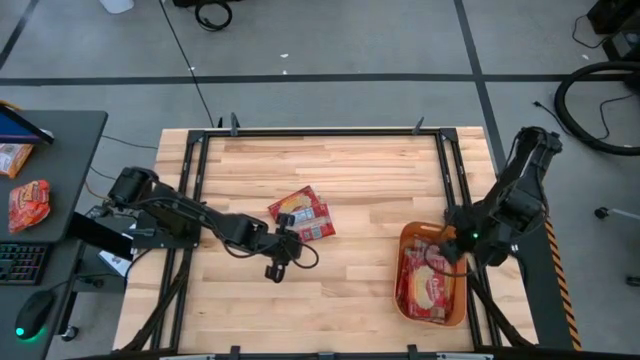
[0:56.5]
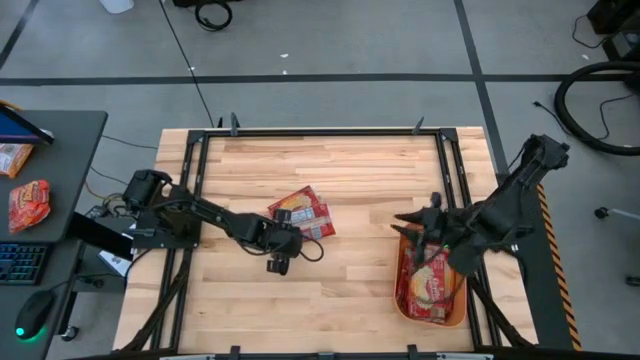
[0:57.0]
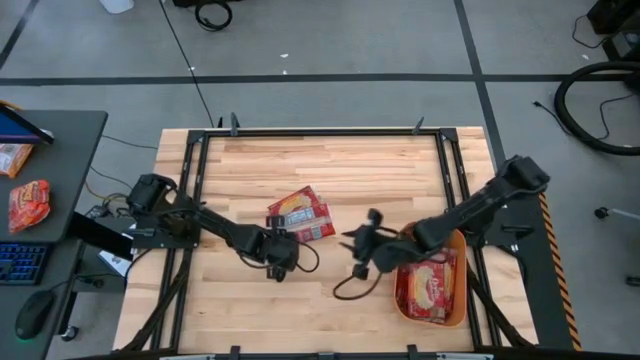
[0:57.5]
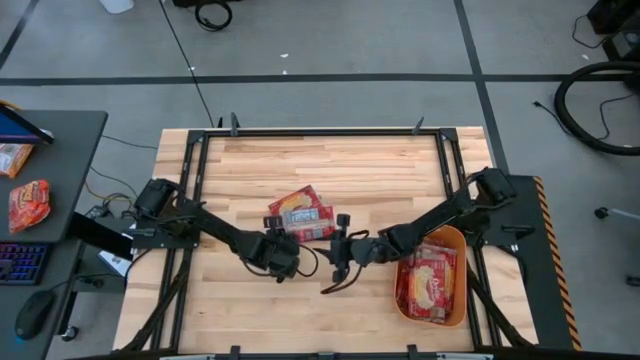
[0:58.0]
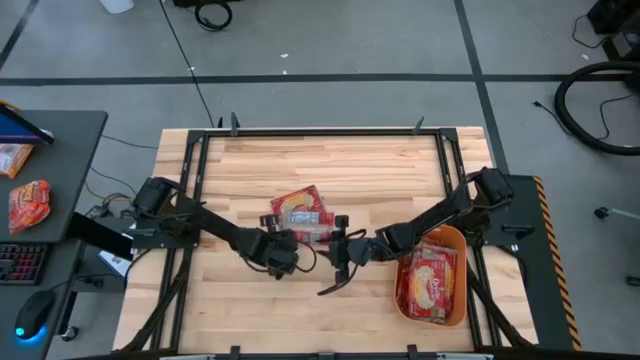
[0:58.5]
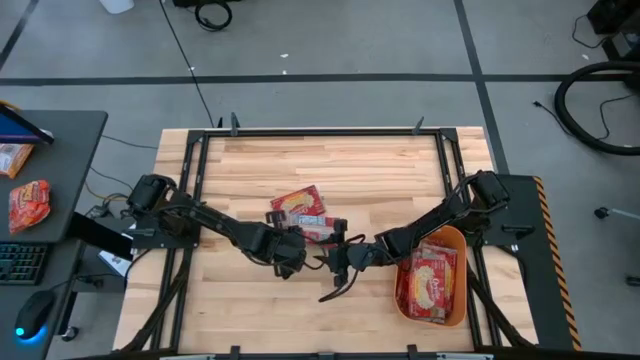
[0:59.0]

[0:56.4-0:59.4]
Task: Sort popcorn bags into baskets
Put the red popcorn bag into the orange bin

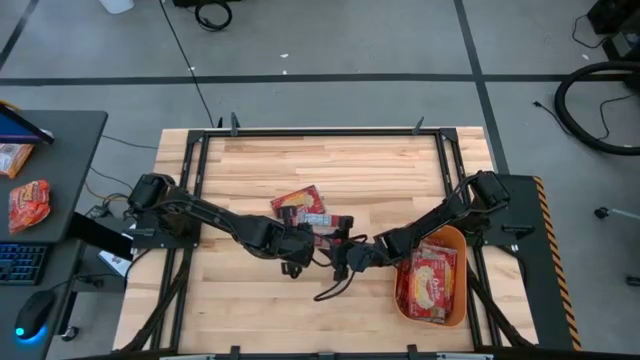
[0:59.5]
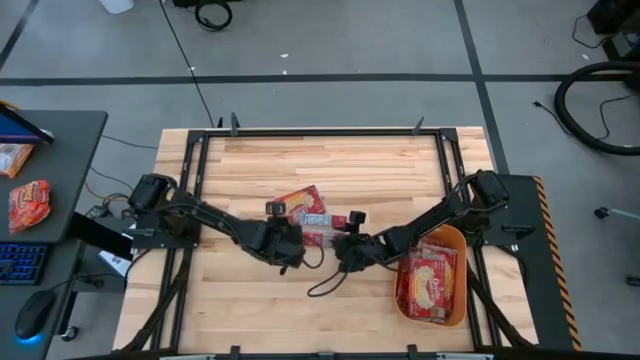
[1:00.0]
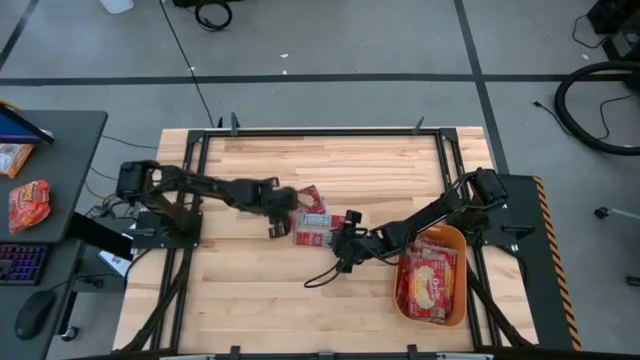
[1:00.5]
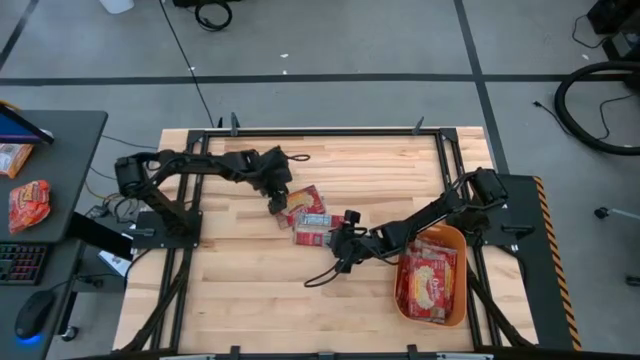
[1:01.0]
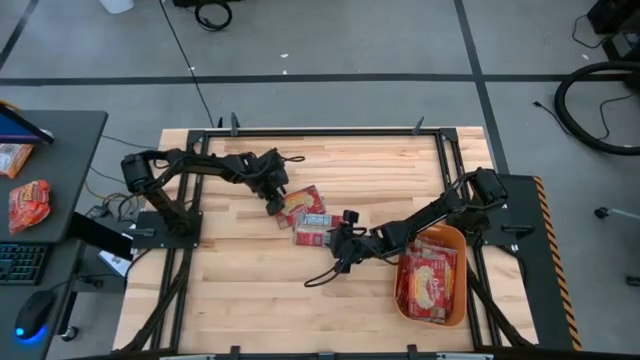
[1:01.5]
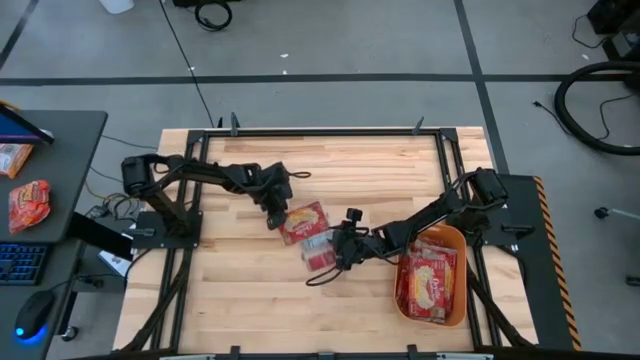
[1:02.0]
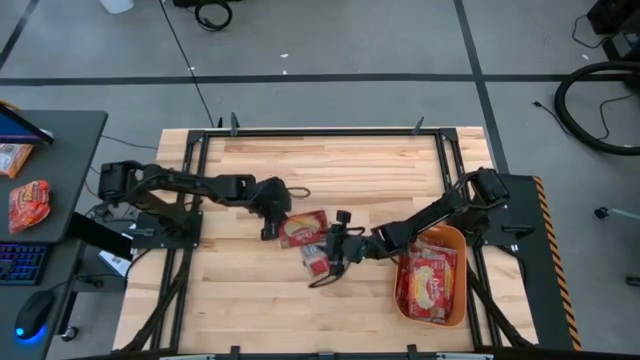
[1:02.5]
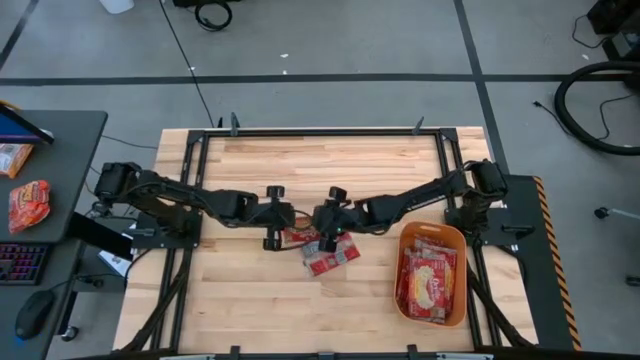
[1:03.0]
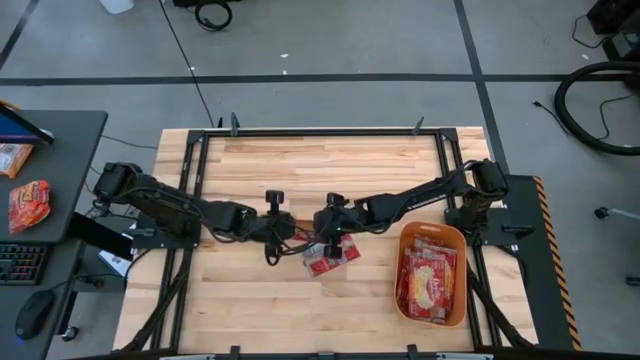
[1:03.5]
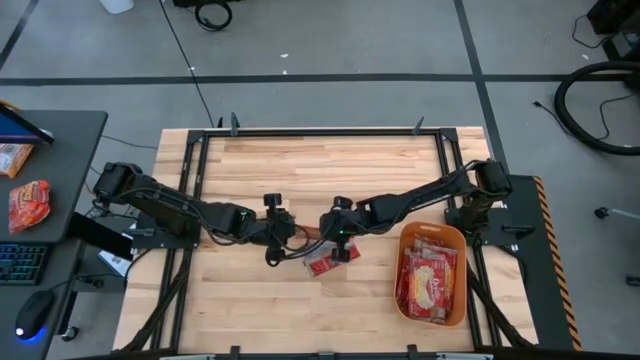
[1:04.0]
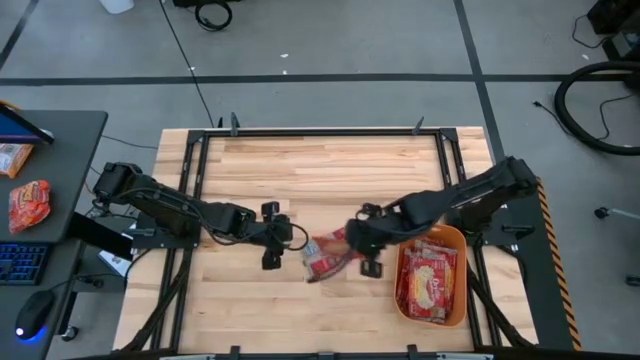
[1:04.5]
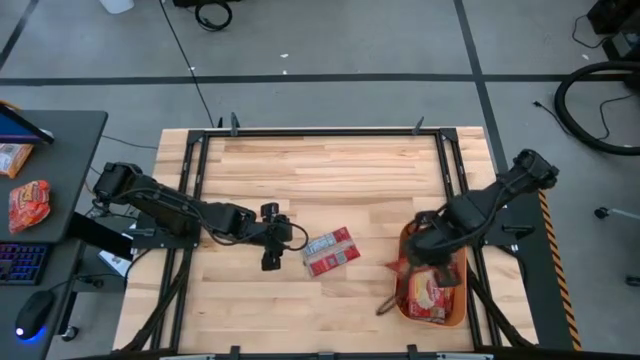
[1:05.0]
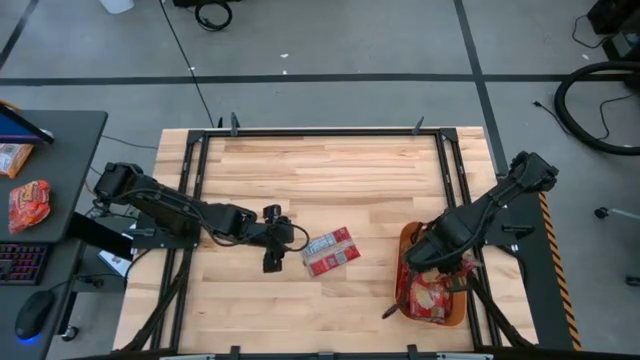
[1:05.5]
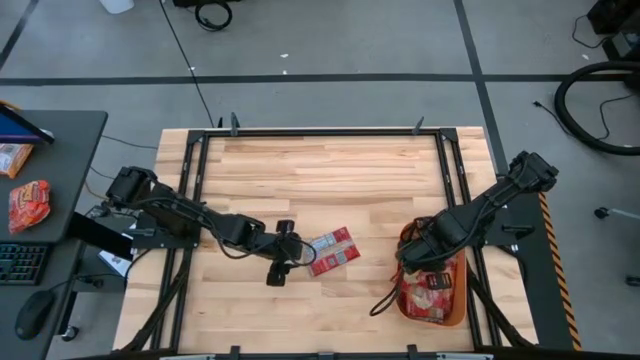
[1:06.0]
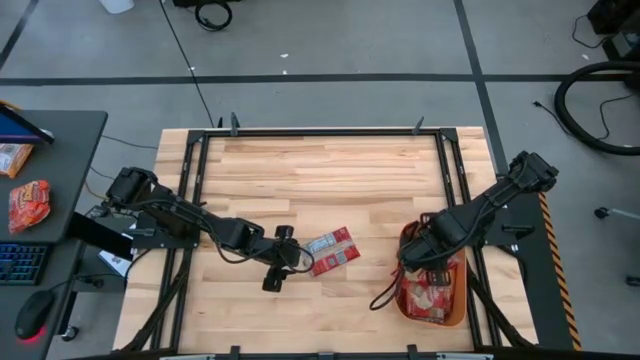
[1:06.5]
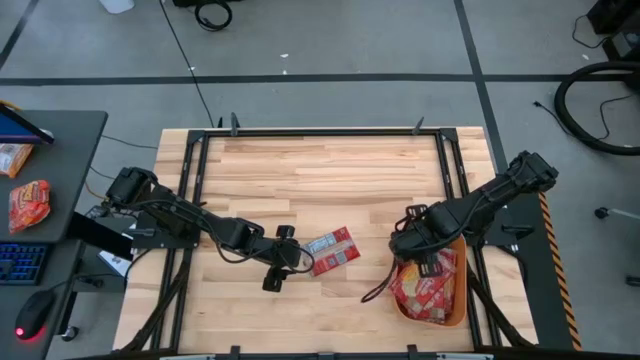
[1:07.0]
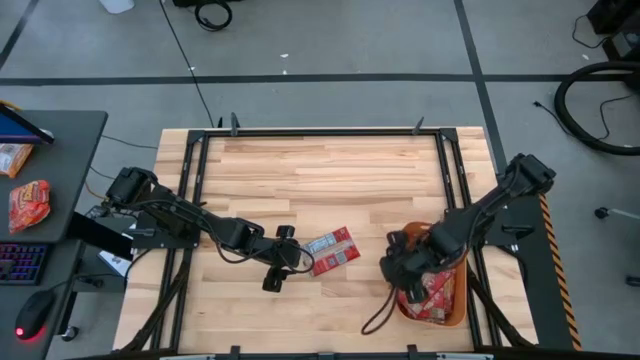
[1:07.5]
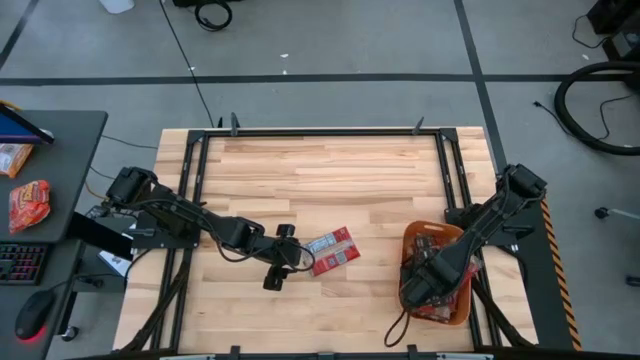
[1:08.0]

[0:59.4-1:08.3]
Put the red popcorn bag into the orange bin

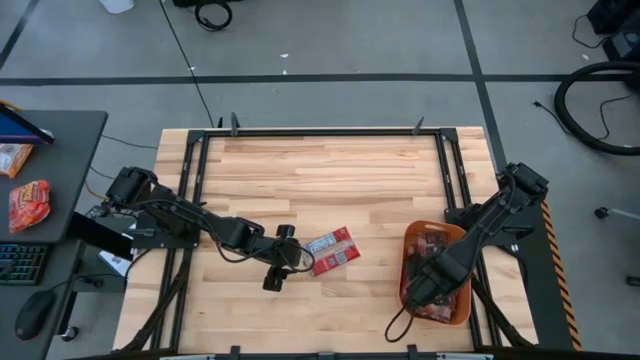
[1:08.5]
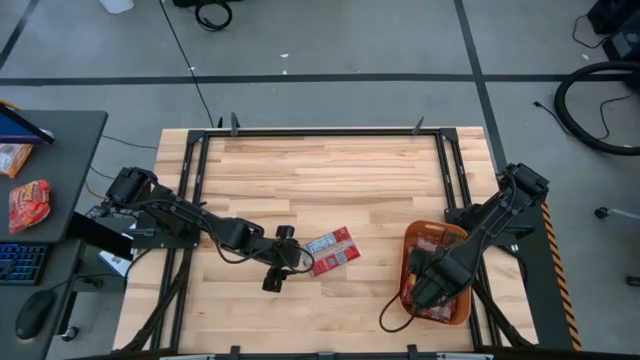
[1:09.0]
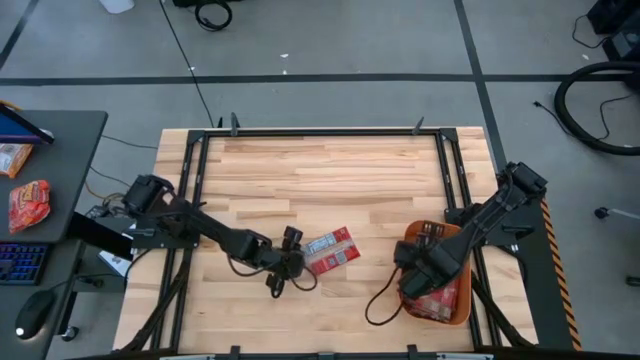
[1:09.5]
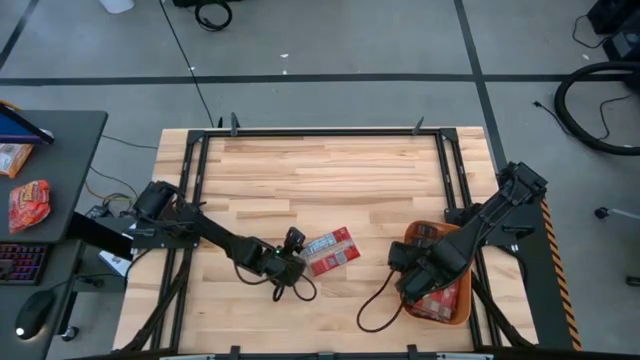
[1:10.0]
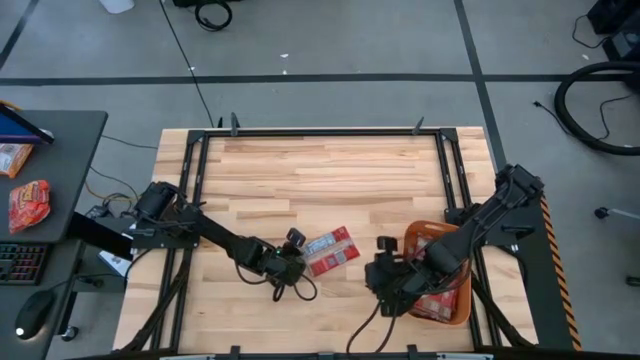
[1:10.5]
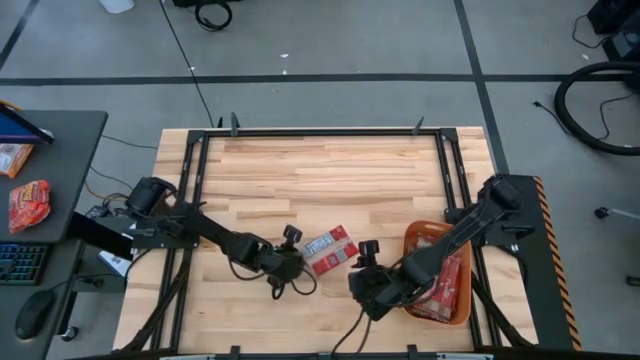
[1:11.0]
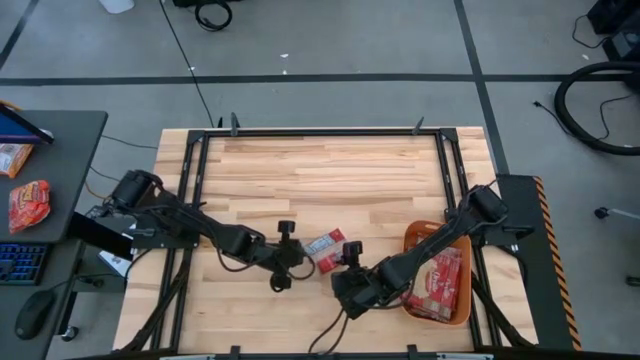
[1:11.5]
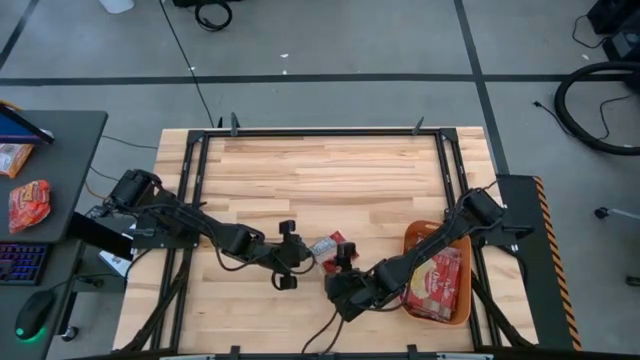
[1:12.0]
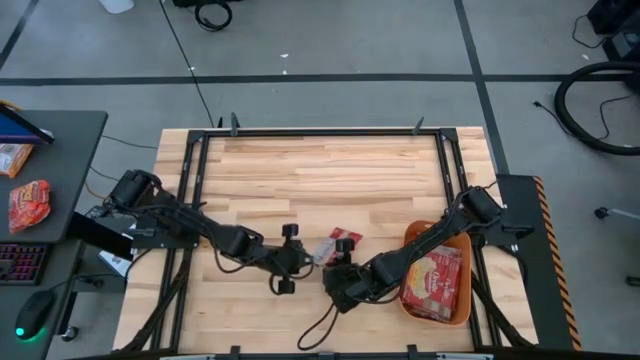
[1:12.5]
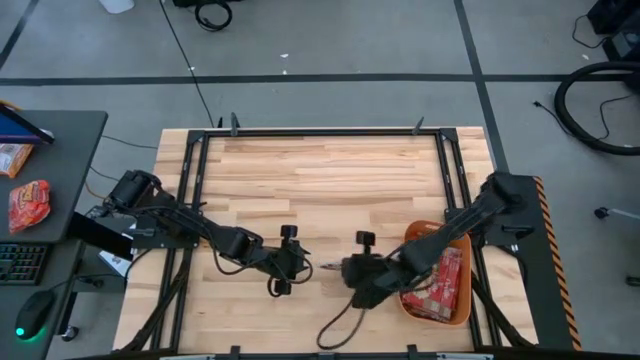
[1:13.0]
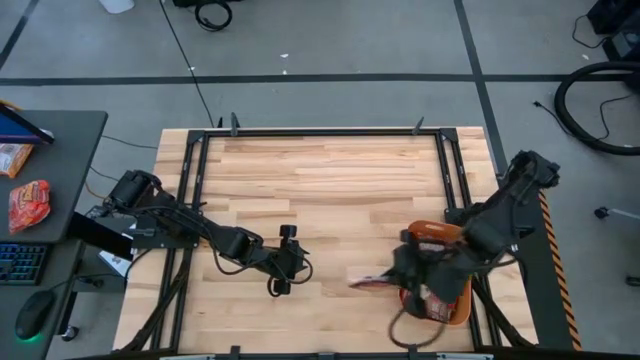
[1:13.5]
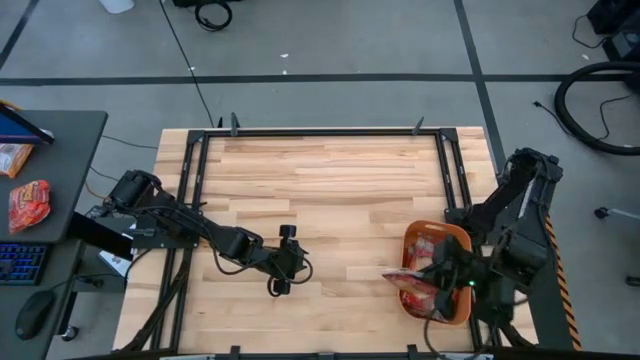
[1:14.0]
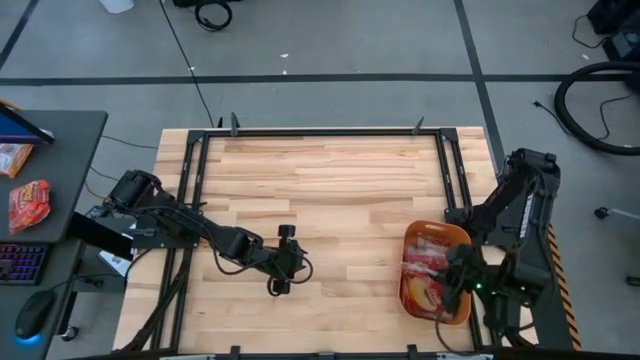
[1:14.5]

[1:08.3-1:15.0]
Put the red popcorn into the orange bin

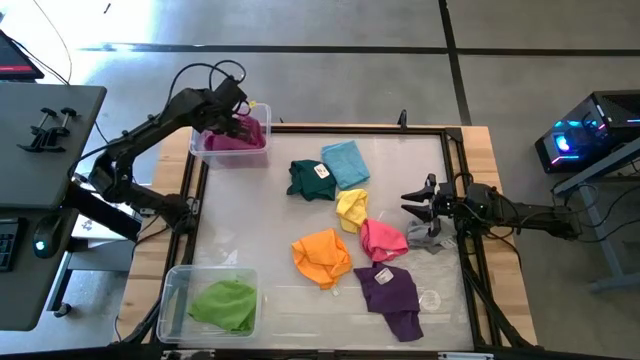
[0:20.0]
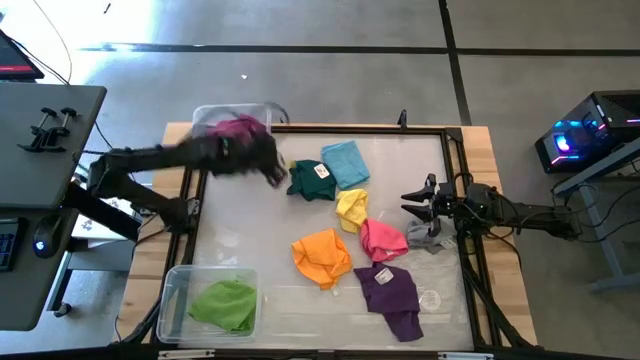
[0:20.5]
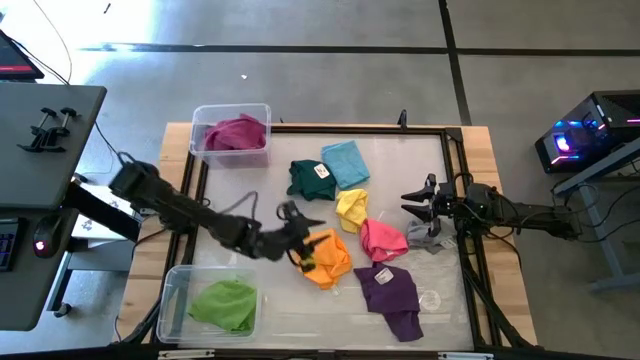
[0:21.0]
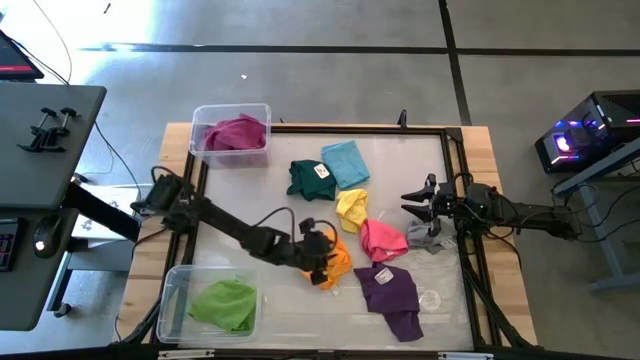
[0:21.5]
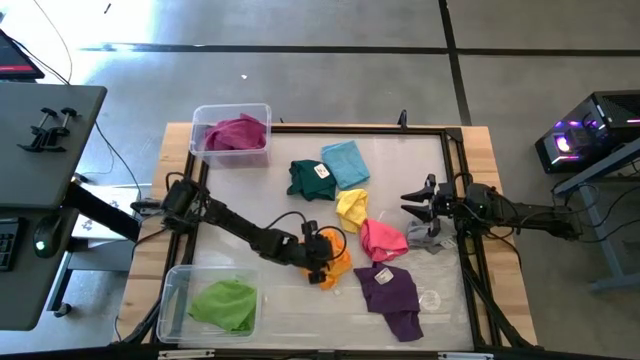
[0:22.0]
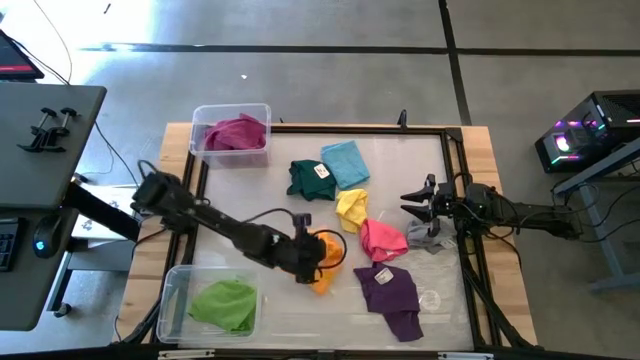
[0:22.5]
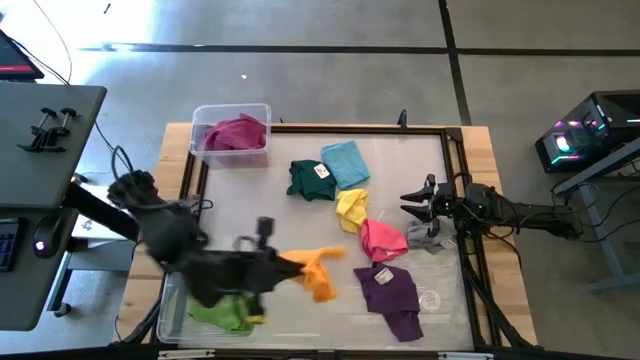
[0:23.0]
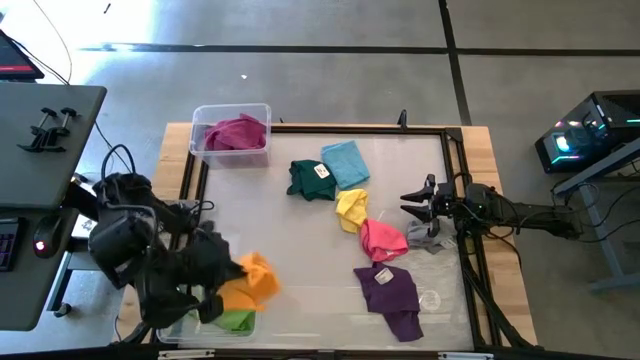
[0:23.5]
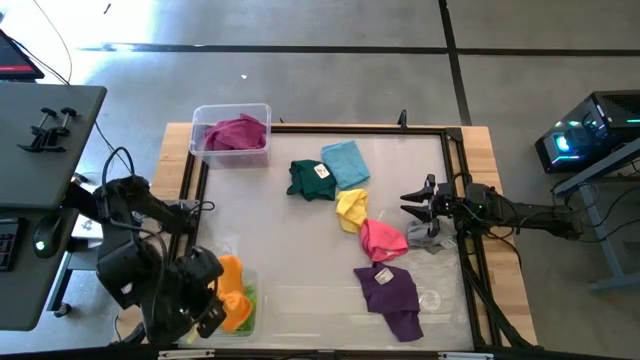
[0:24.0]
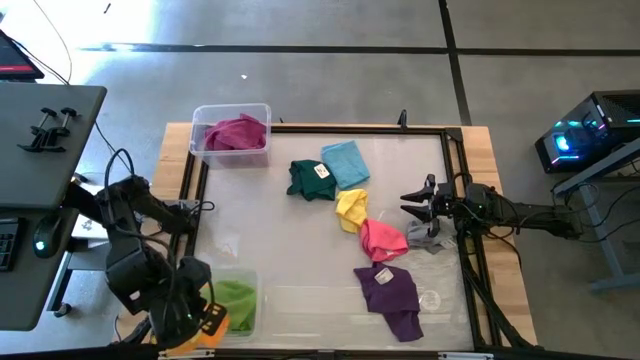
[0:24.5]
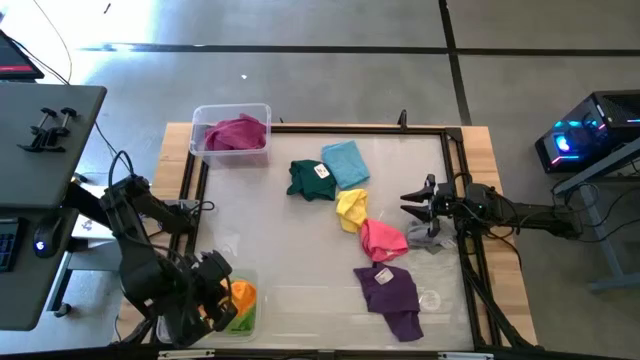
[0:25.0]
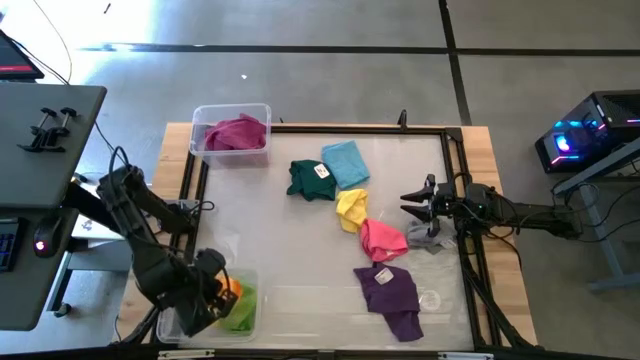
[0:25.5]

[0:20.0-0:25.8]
Task: Sort towels by color in basket
Put the orange towel into the bottom transparent bin
